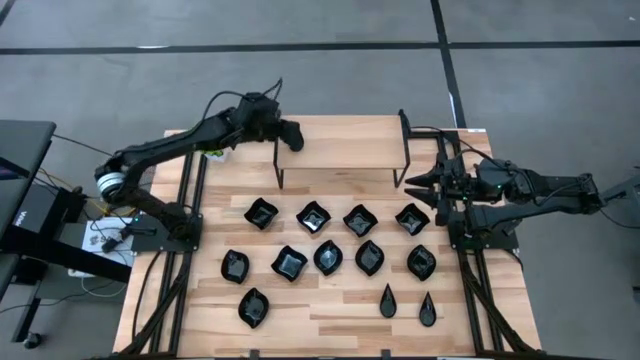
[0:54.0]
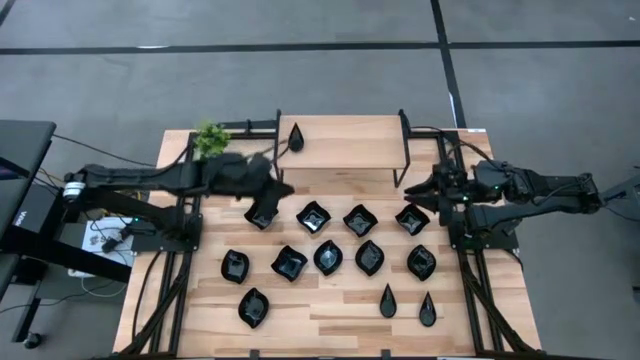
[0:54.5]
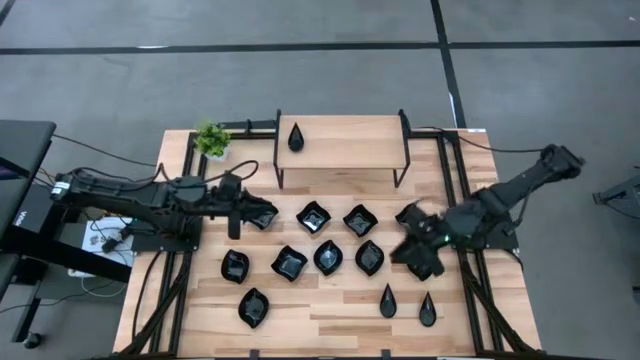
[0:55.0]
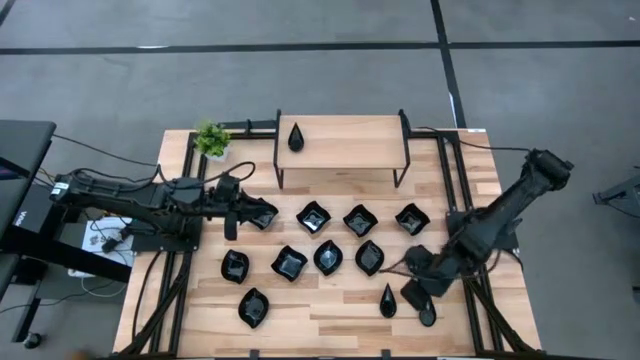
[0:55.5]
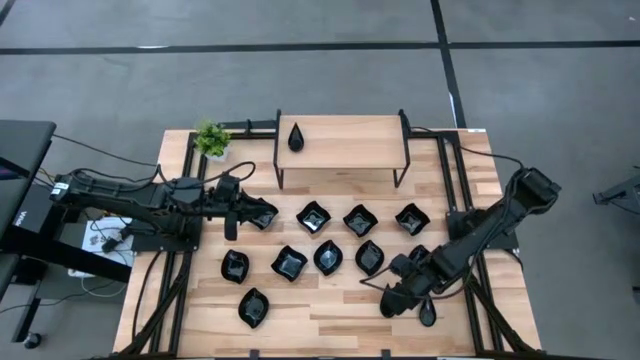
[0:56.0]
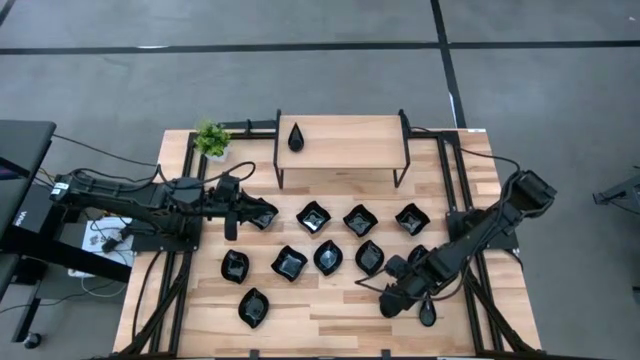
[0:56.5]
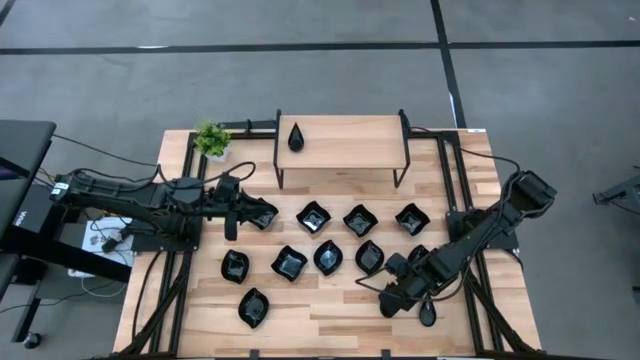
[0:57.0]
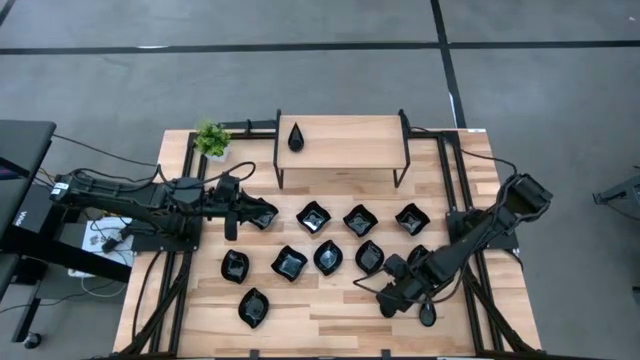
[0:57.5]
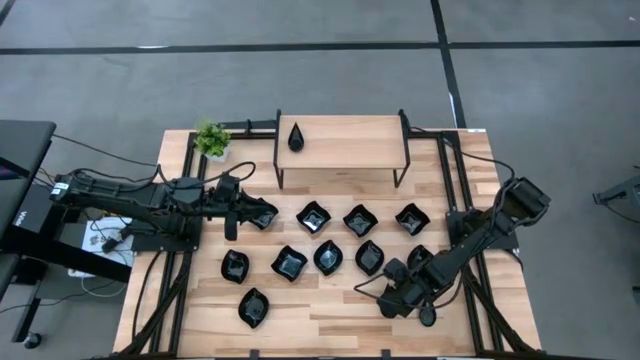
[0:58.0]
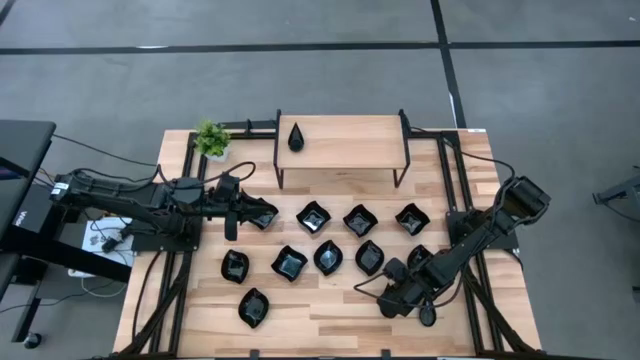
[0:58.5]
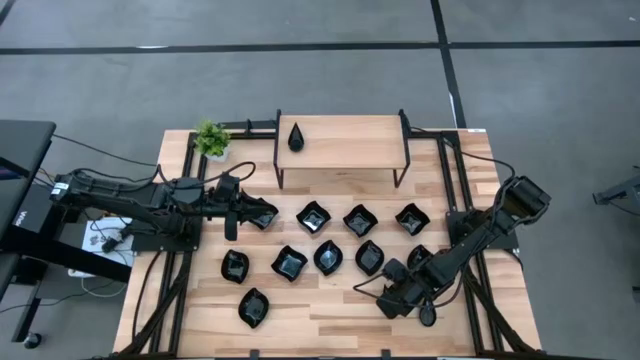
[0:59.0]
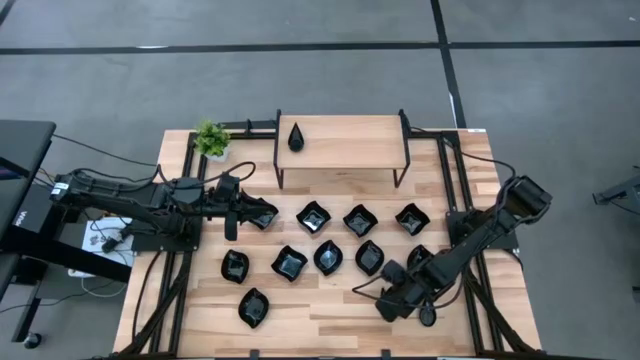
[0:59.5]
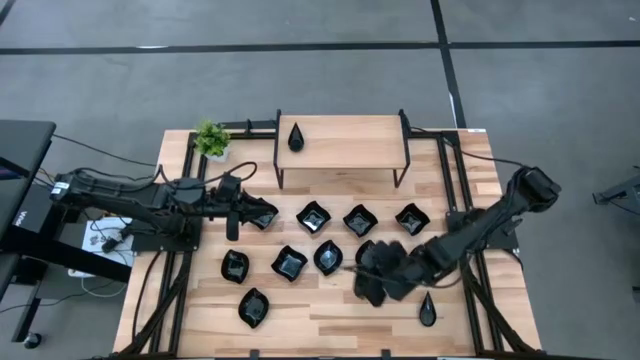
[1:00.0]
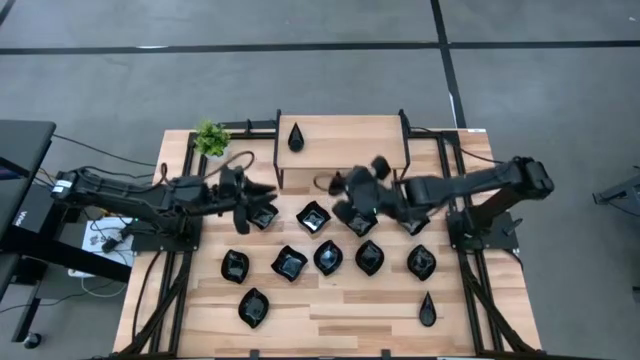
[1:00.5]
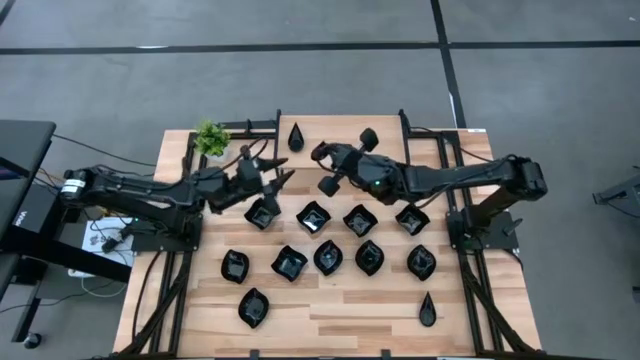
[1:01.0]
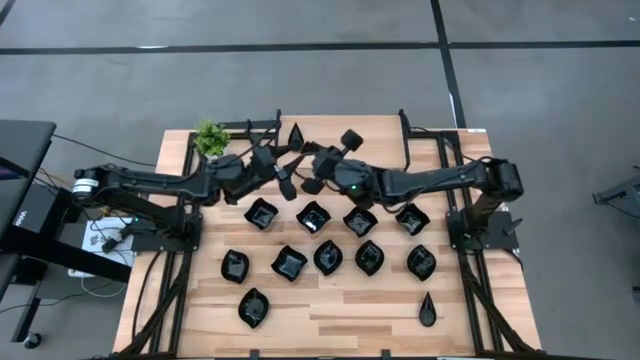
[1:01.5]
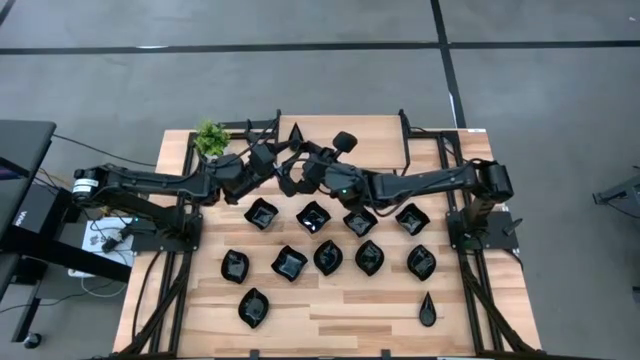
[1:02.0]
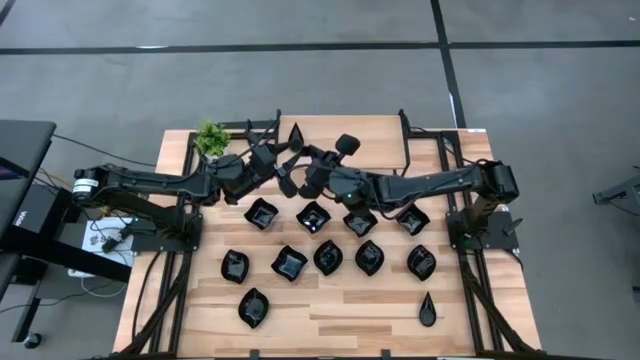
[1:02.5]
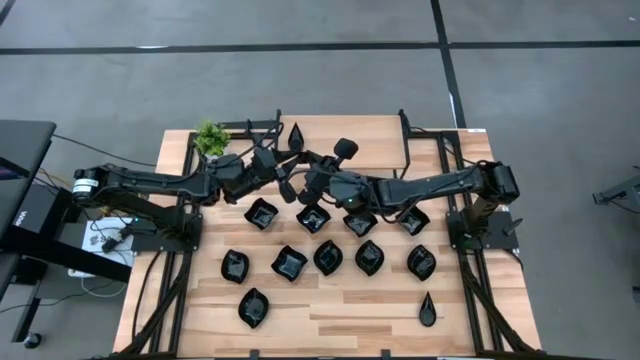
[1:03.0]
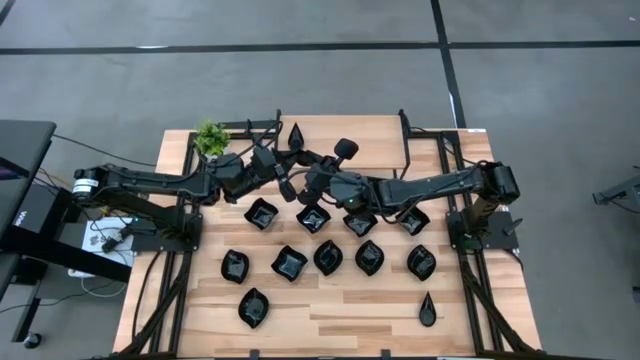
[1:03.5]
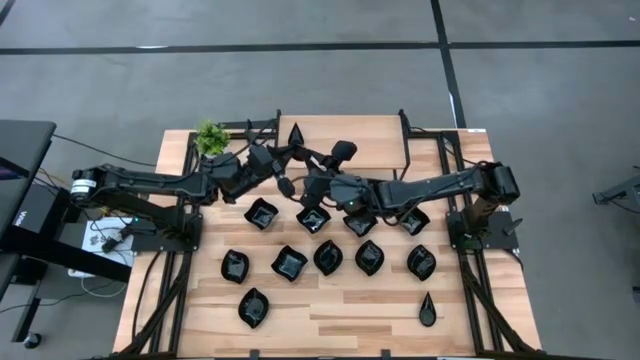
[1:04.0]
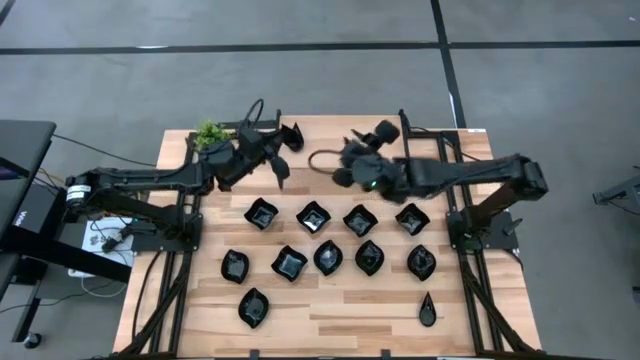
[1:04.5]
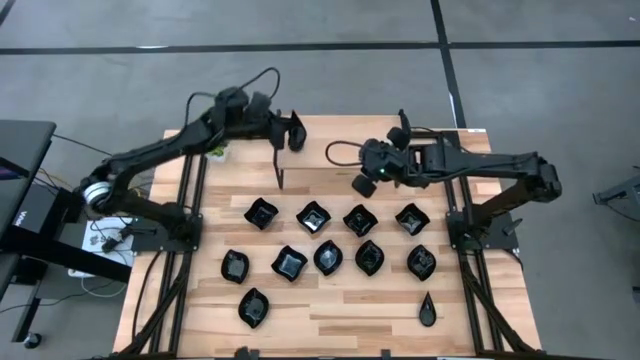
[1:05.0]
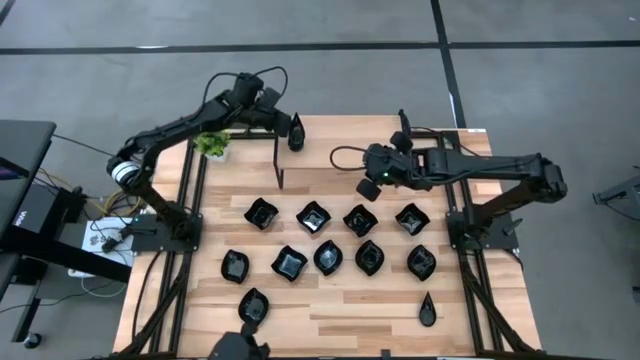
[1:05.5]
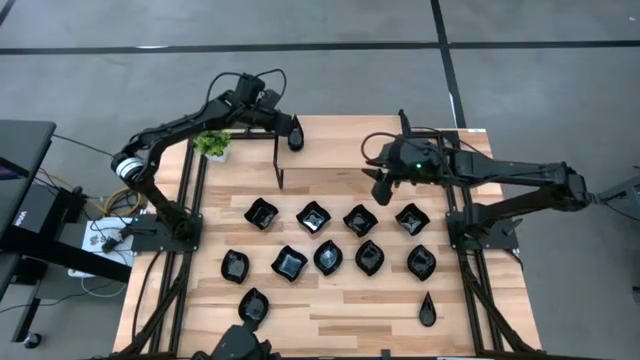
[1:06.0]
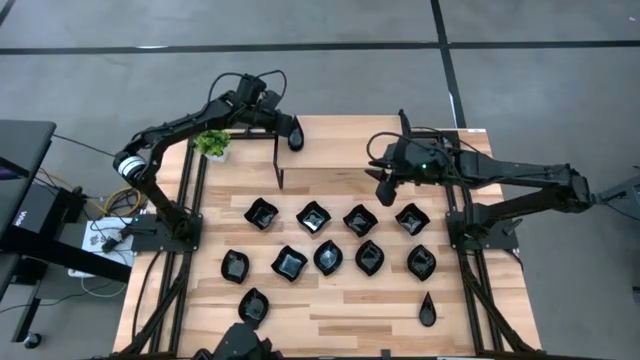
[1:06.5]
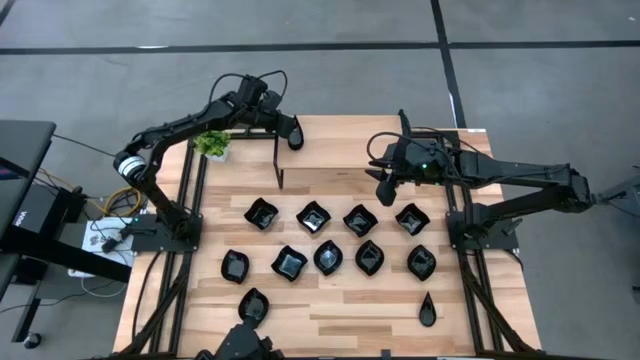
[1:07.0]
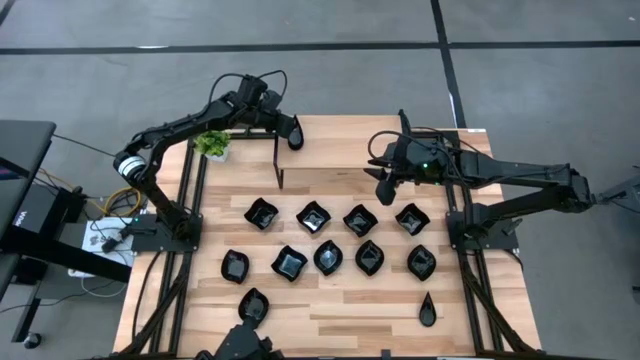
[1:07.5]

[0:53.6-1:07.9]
Task: Pick & Place Mini shaped plates
Stack the black drop shaped plate on top of the black drop shaped plates on the shelf

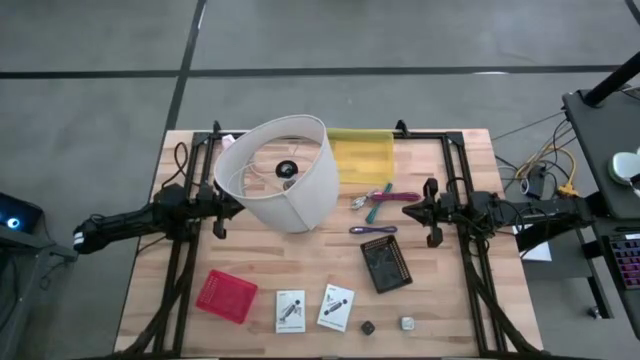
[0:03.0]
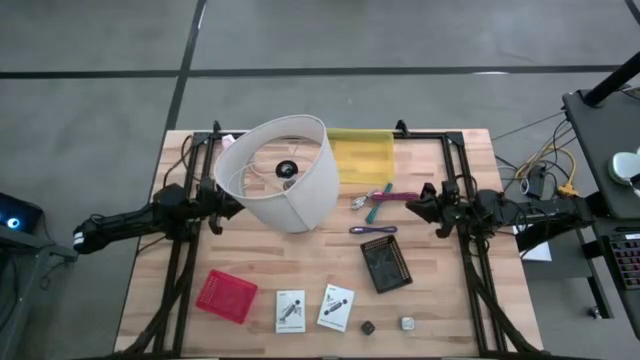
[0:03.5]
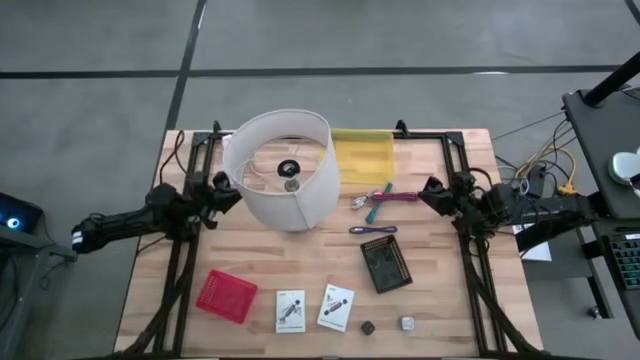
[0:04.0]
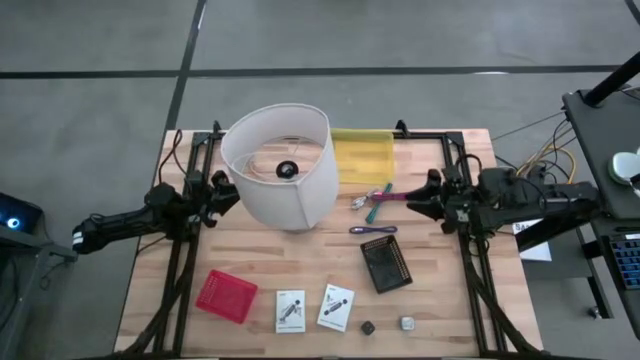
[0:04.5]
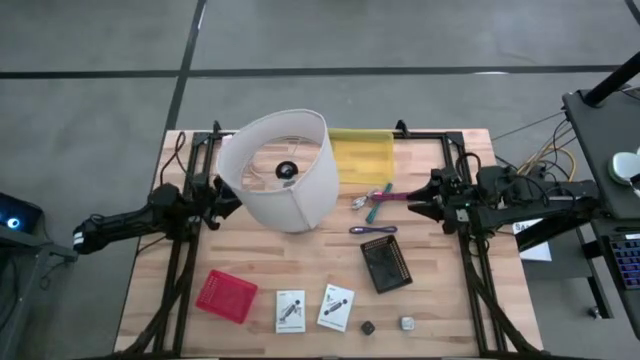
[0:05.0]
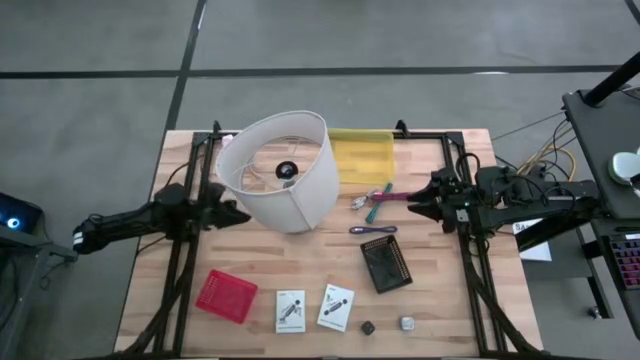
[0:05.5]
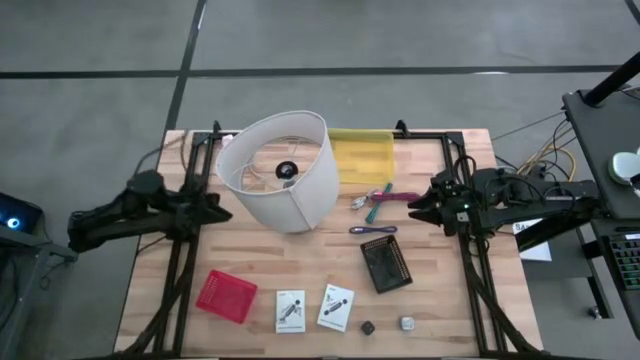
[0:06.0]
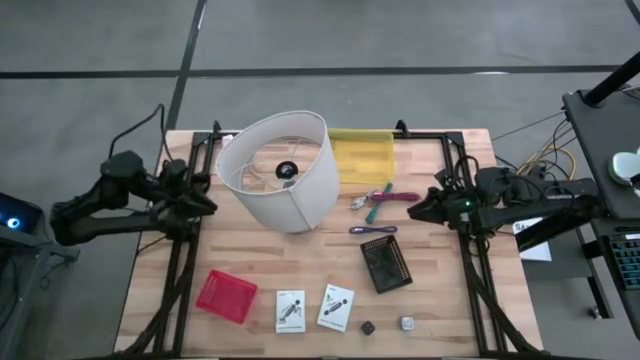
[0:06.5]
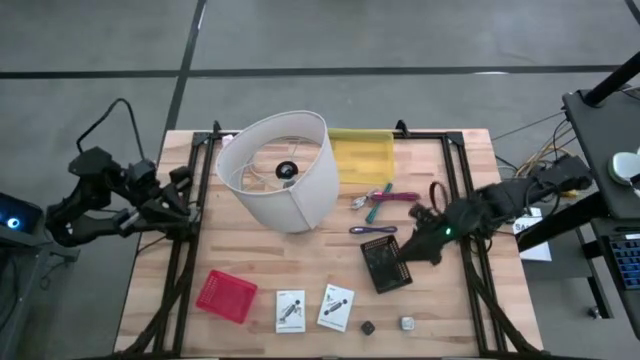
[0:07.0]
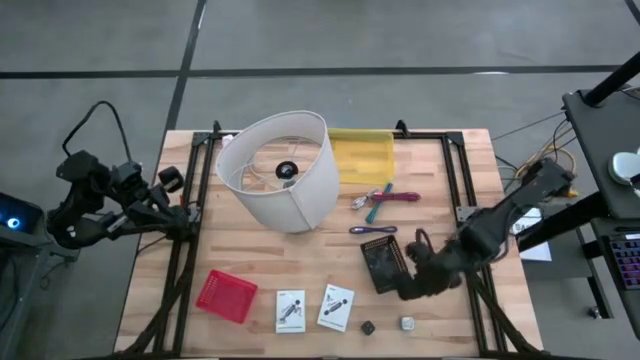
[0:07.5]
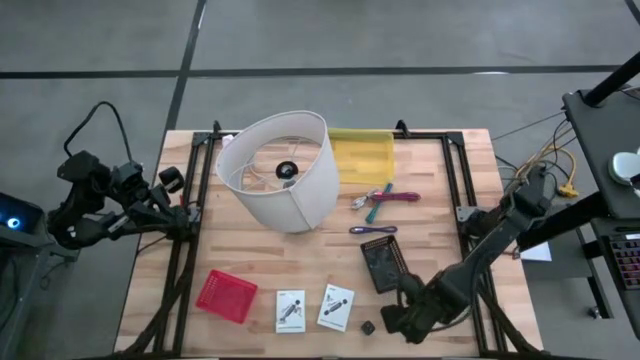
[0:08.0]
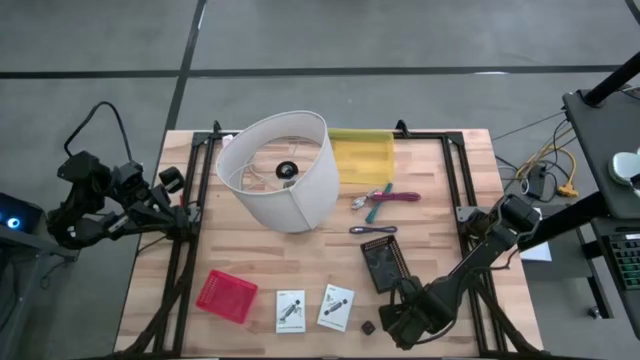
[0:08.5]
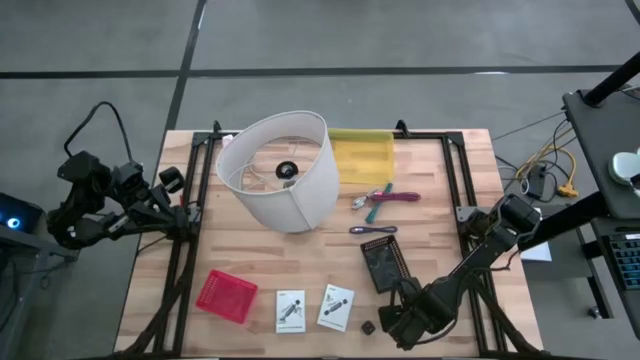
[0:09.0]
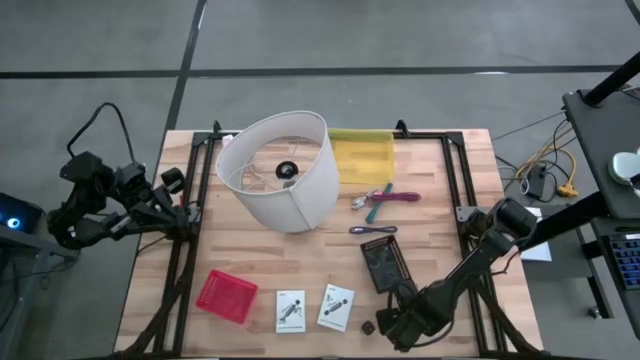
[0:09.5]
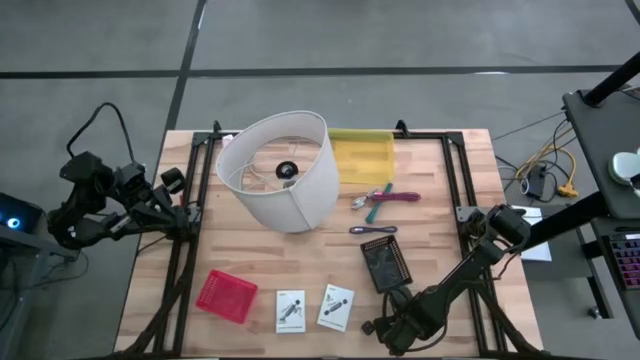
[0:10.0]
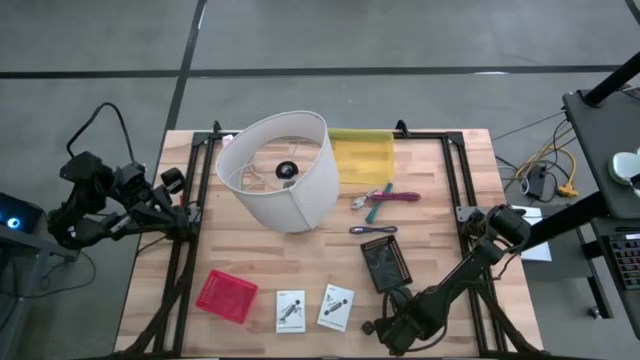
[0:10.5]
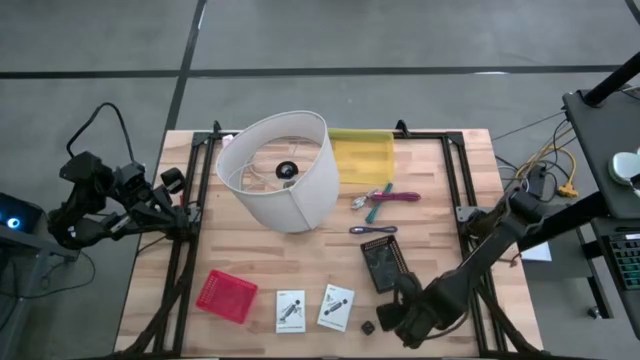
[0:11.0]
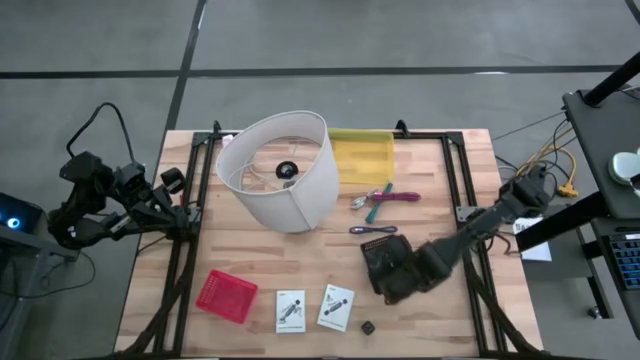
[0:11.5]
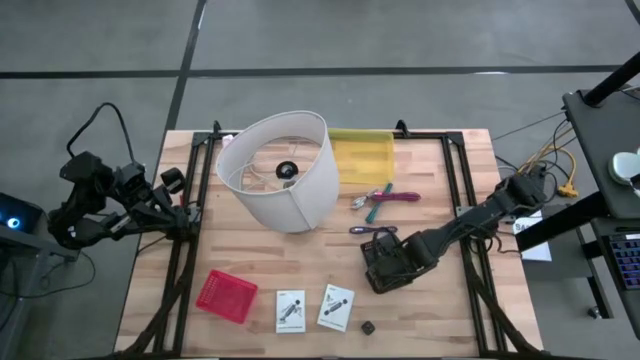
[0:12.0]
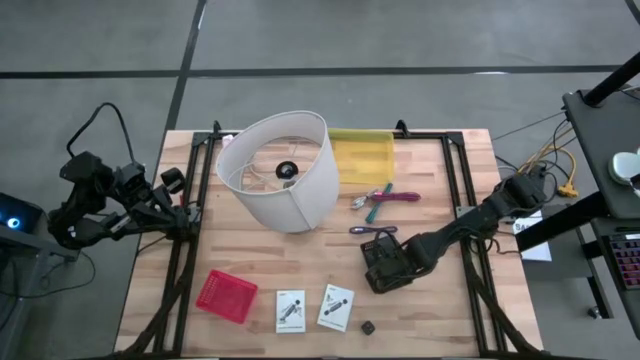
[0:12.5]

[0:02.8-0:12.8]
Task: Pick and place items into bin
Put the blue adapter into the black bin
